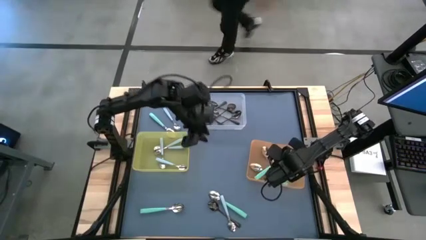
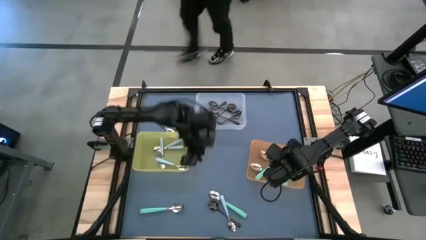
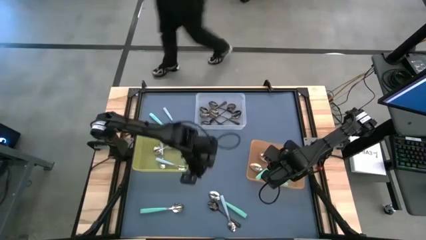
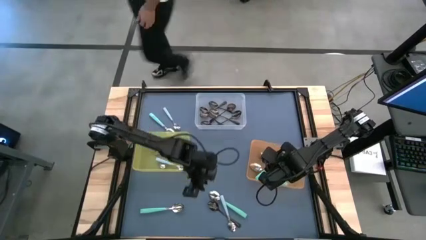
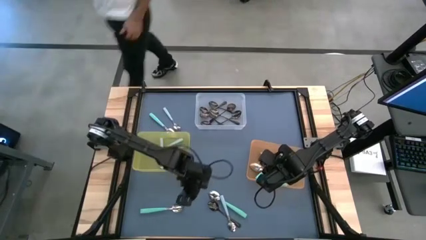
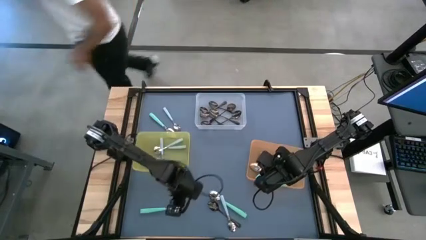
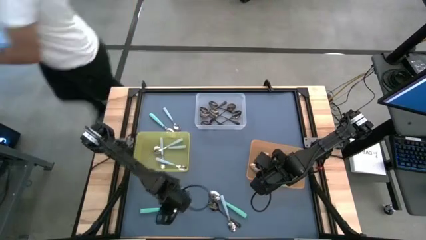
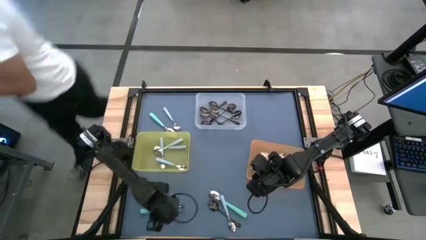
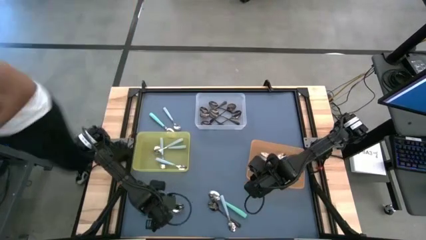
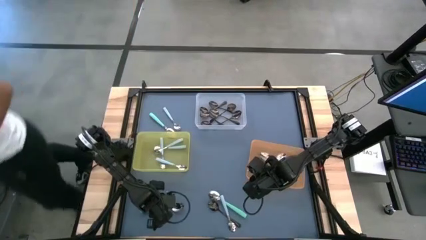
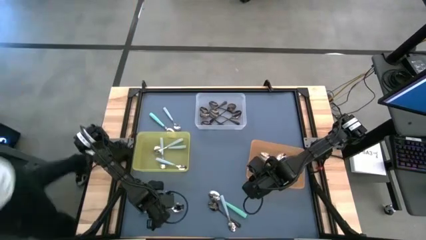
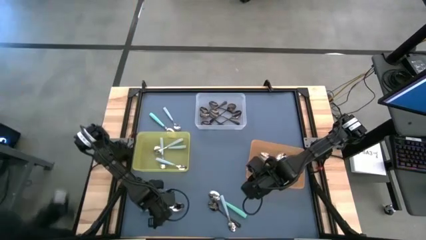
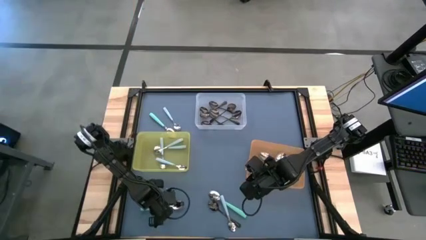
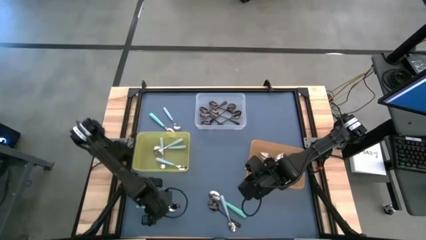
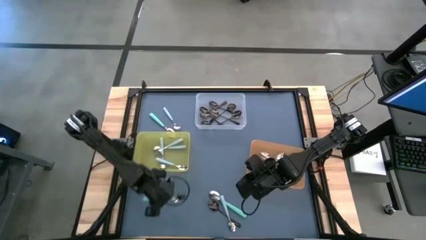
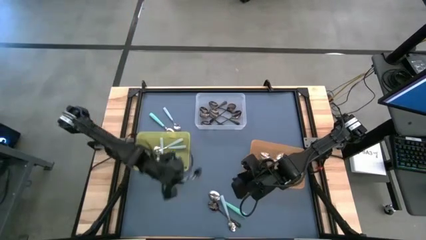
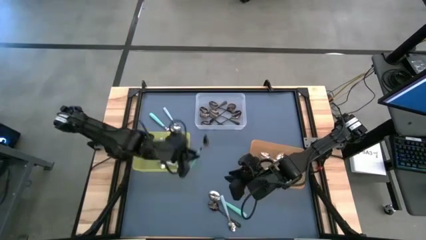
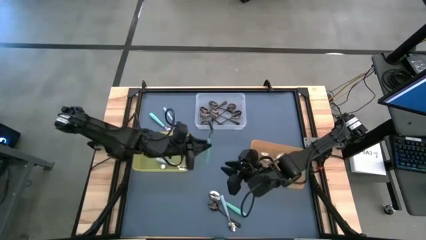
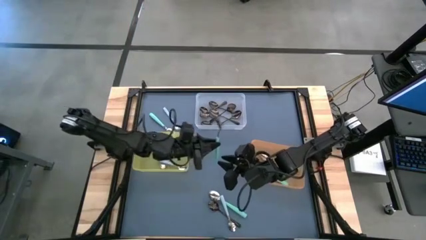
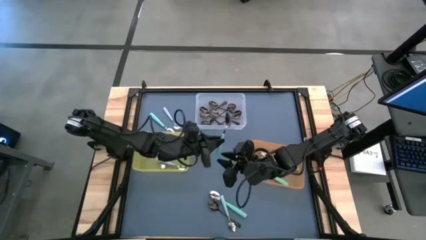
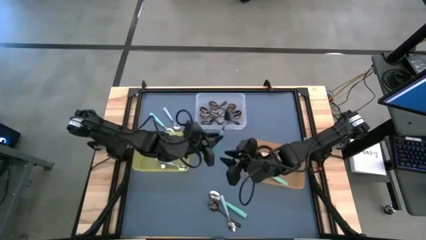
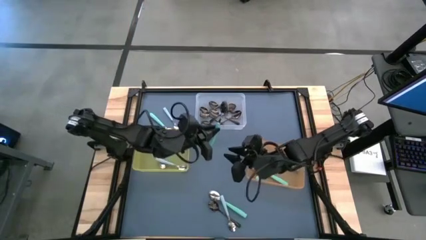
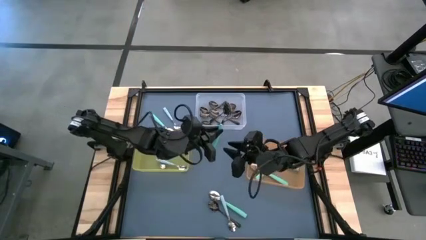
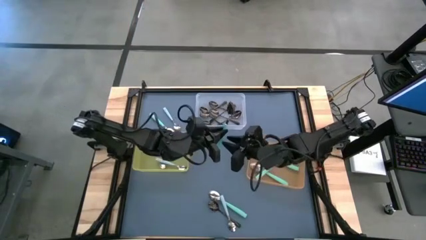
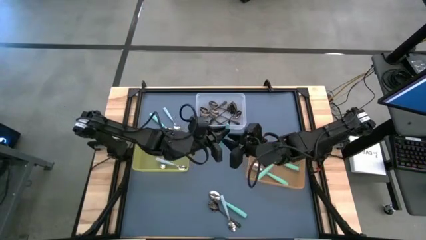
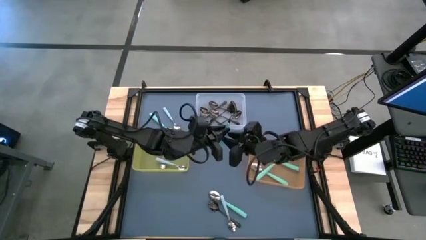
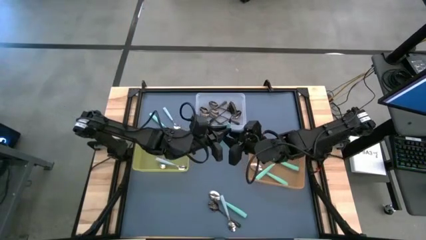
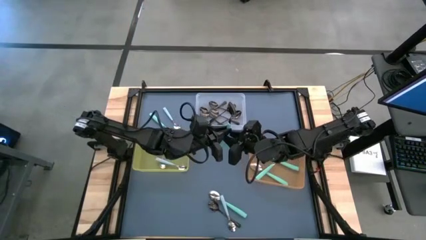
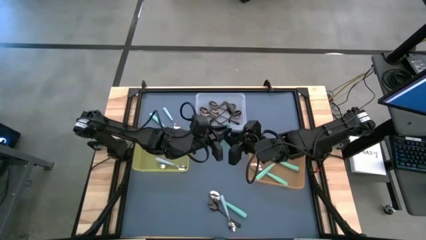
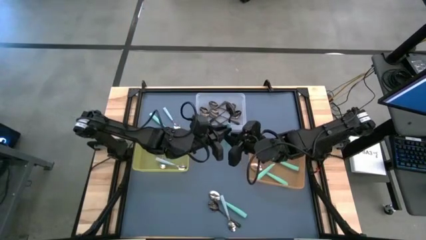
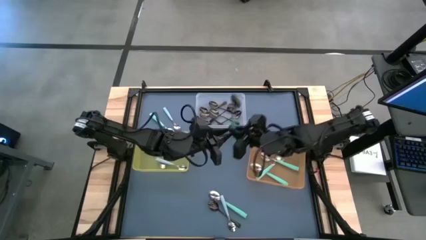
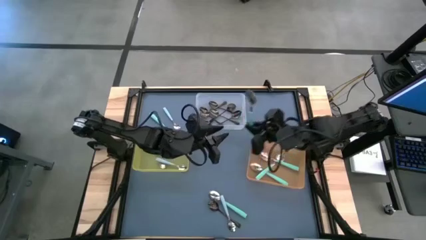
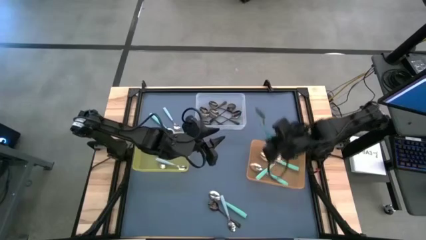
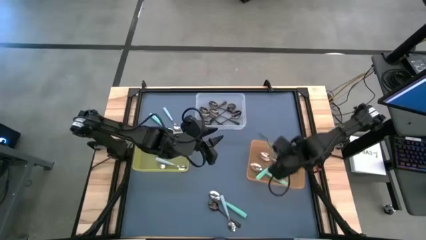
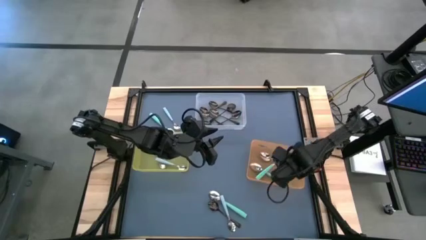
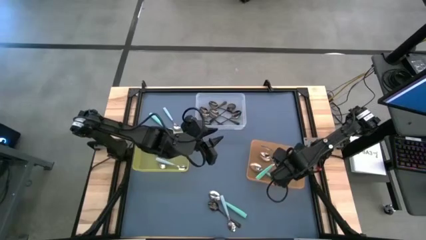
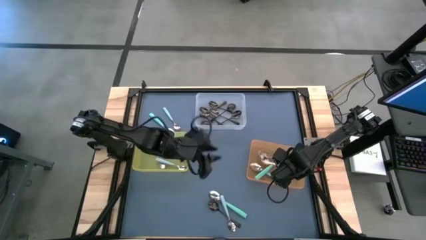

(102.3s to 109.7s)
Task: Sort silverware by color (type)
Put the green spoon into the orange bin

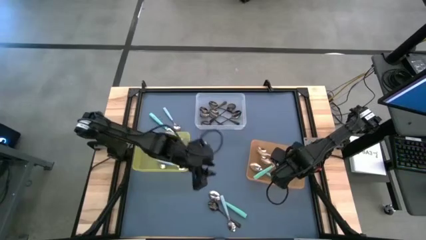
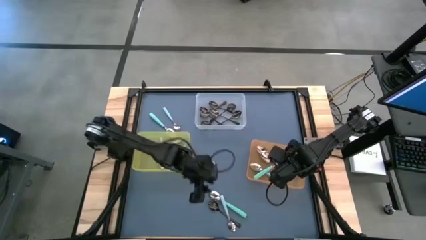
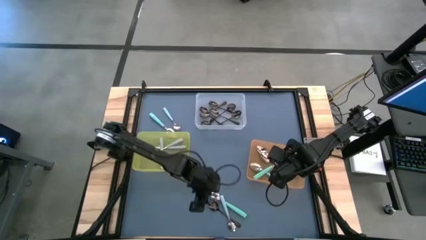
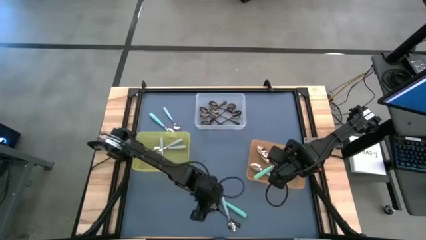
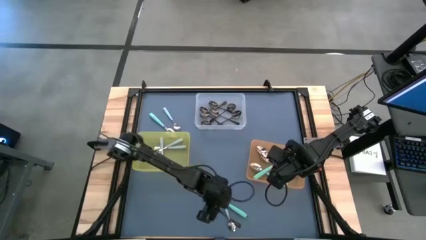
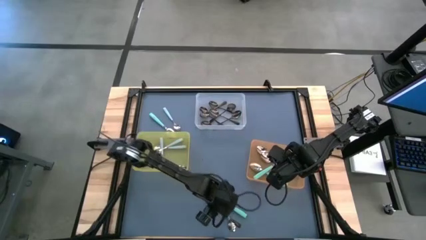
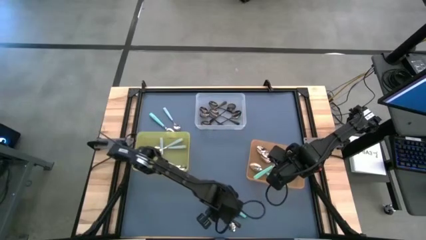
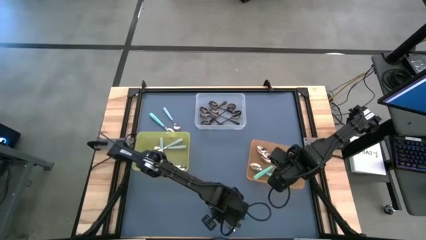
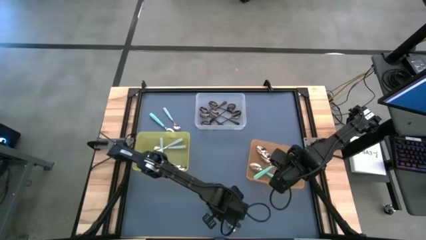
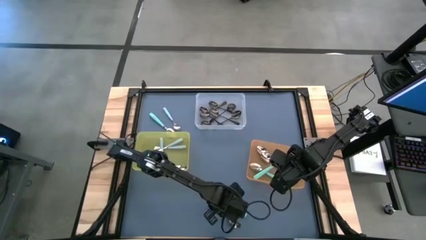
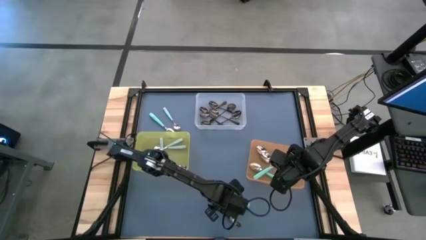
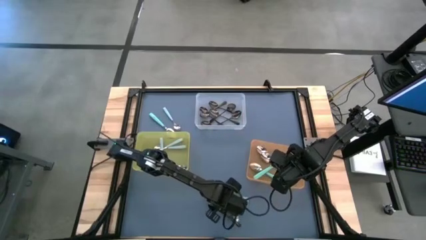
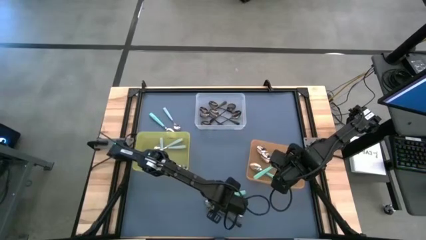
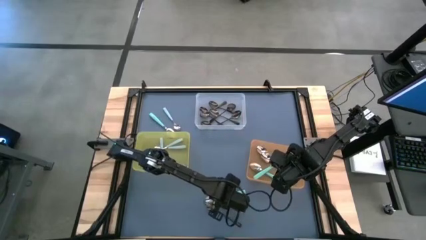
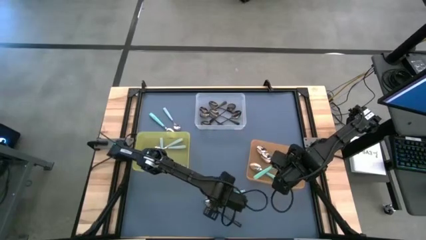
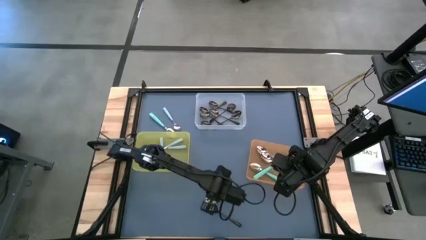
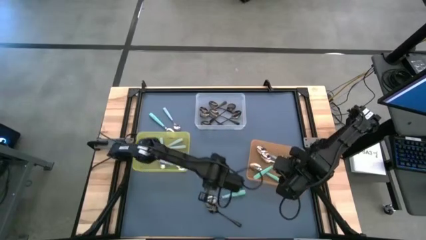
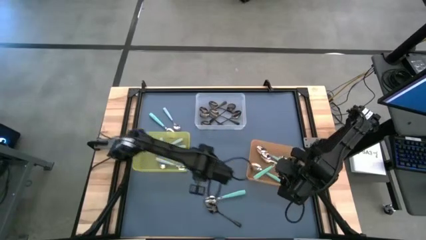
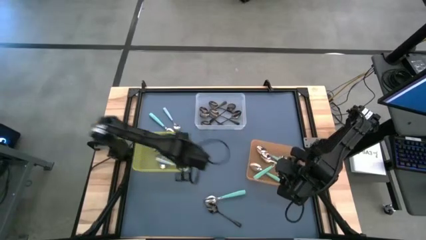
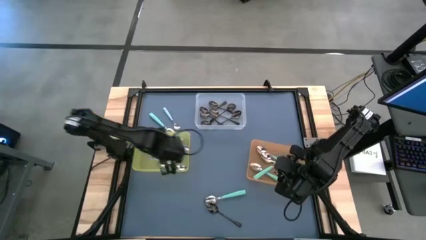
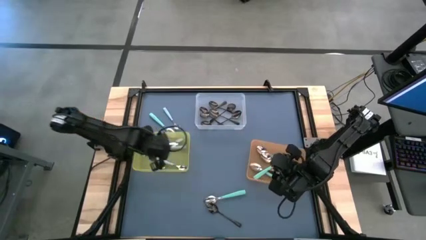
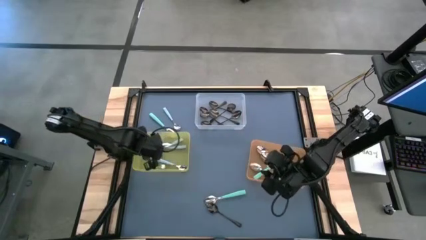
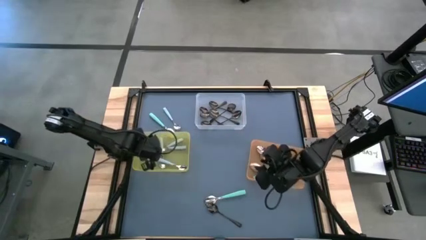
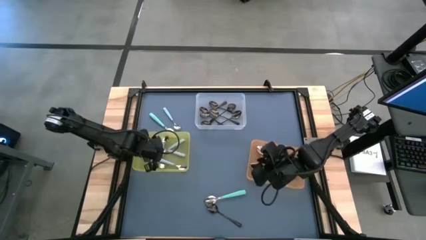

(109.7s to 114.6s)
Put the blue spoon into the yellow bin

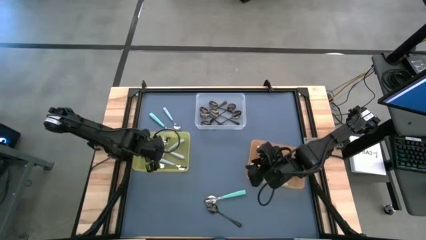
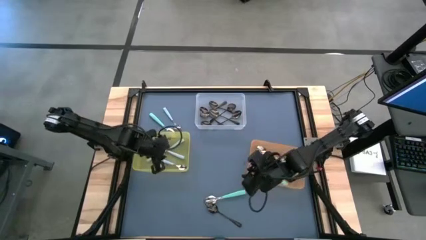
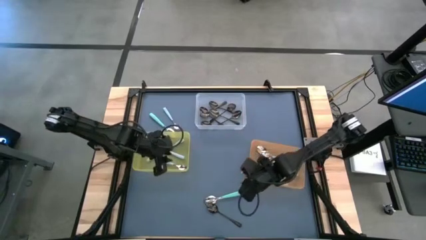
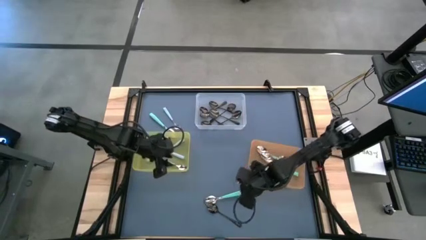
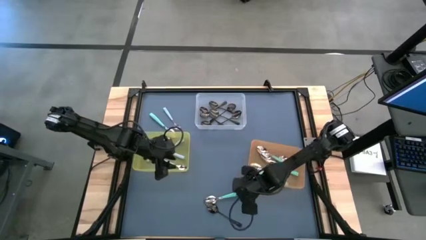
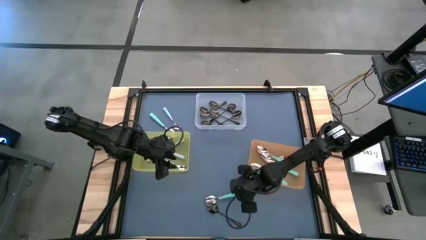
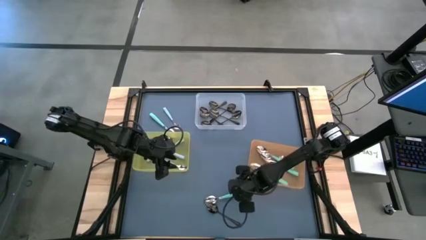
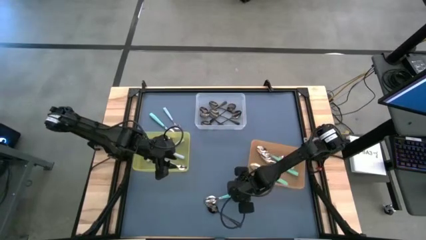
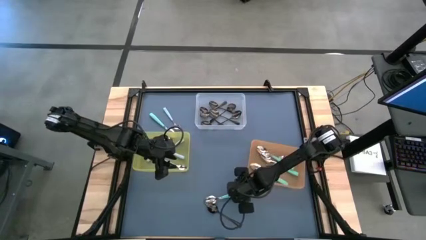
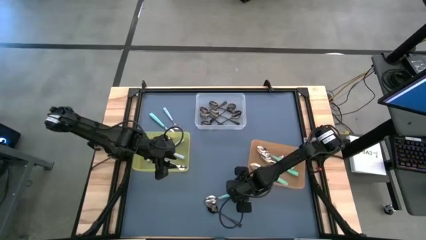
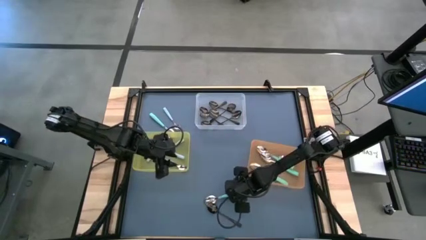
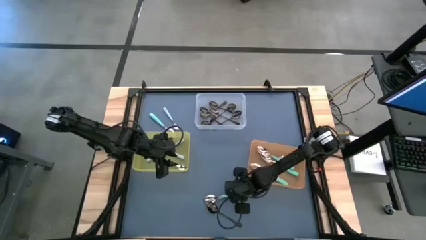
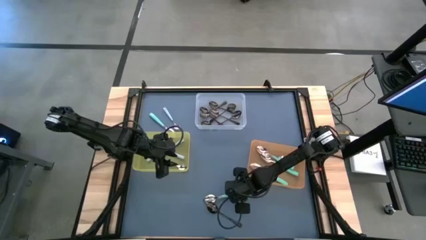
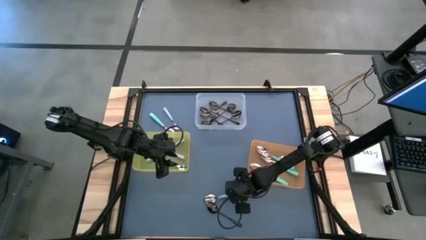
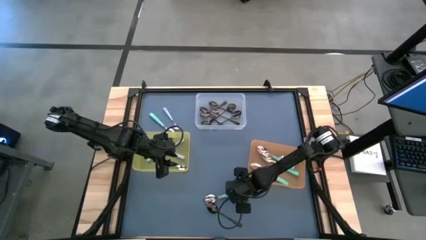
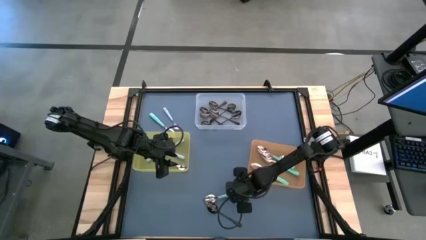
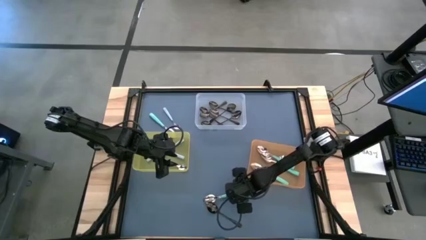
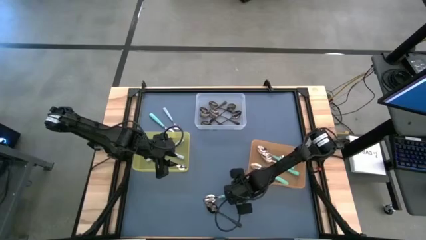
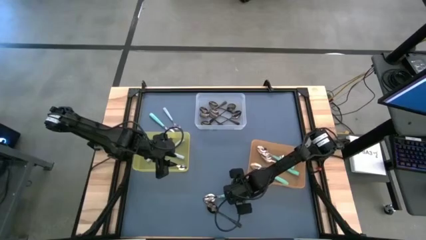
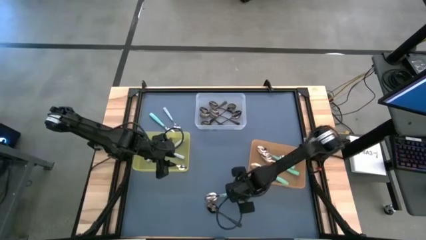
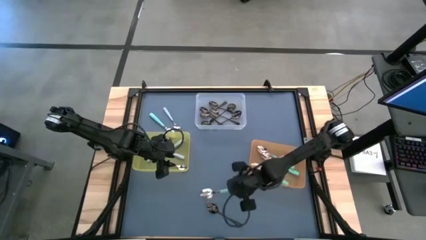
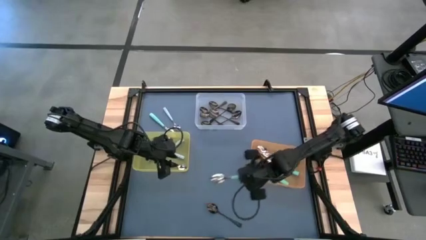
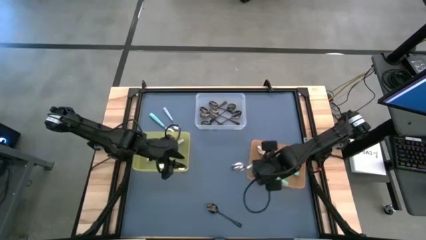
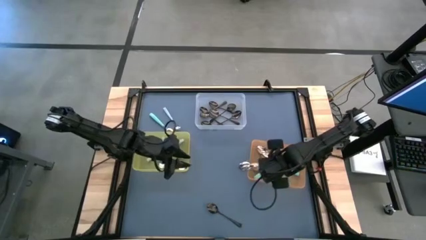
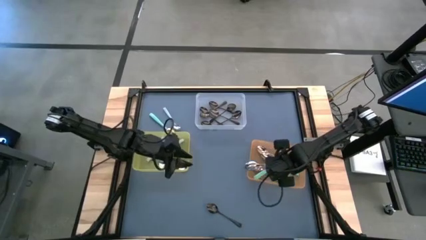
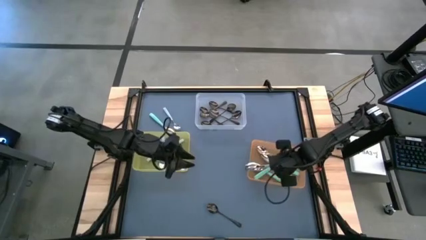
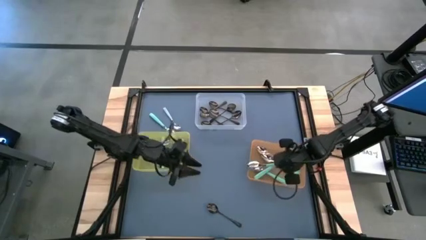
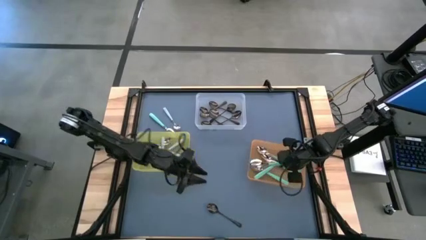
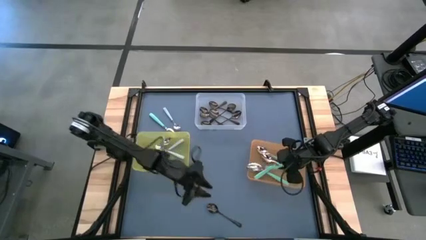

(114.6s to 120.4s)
Put the green spoon into the orange bin
